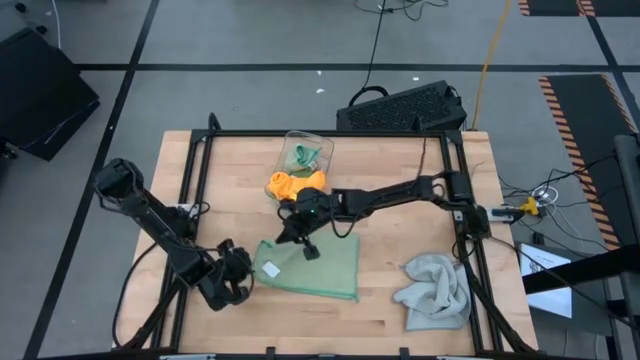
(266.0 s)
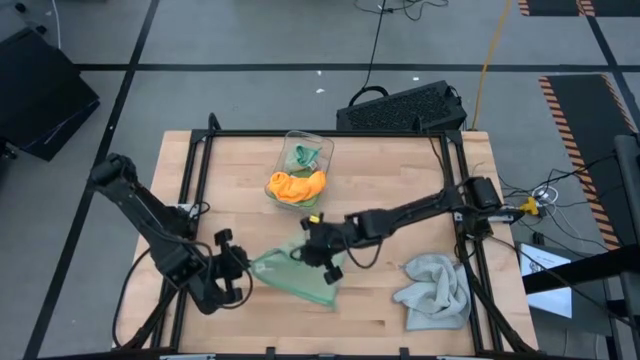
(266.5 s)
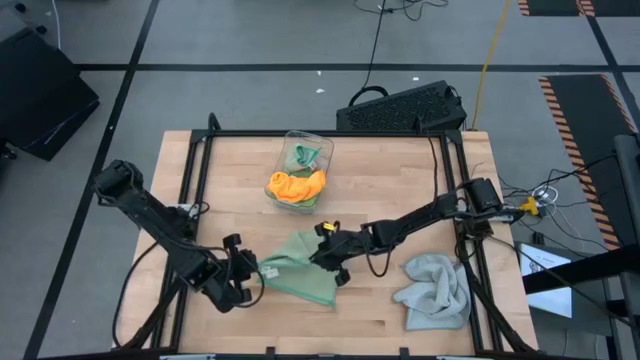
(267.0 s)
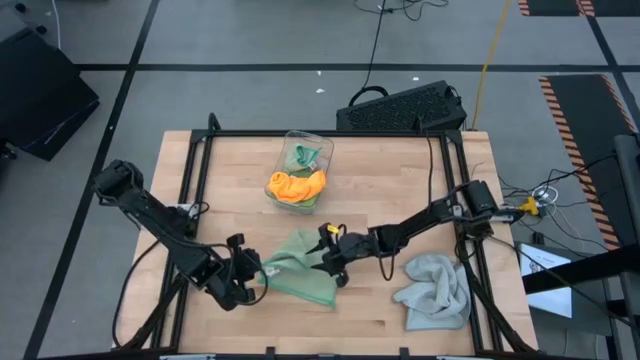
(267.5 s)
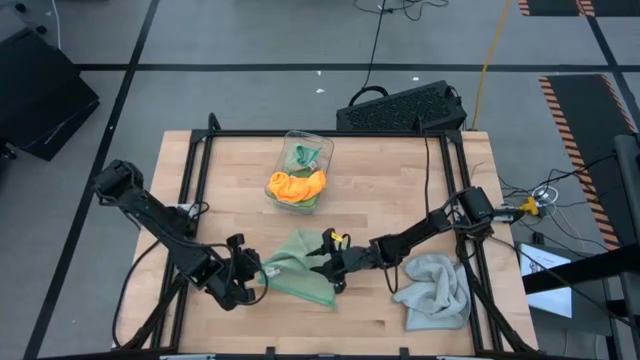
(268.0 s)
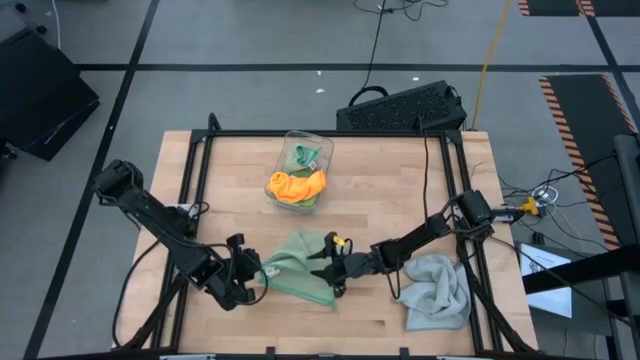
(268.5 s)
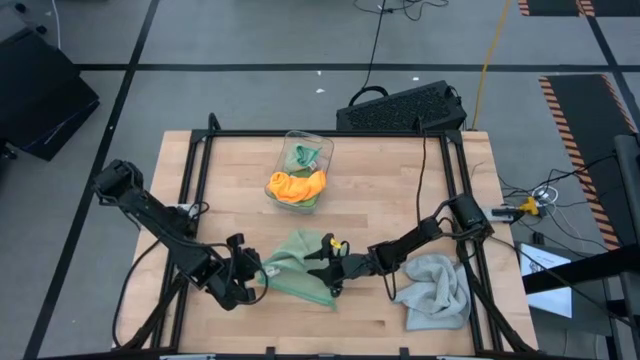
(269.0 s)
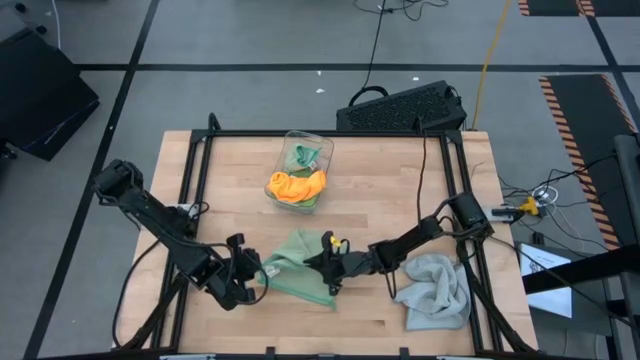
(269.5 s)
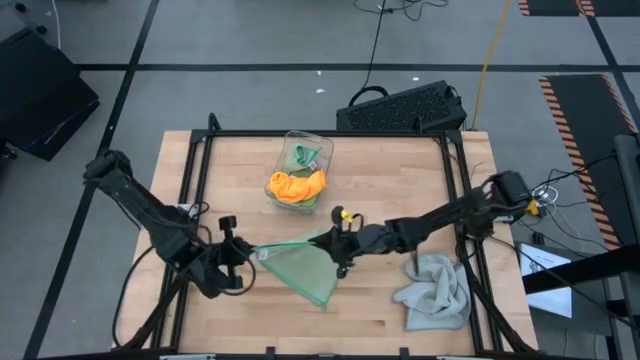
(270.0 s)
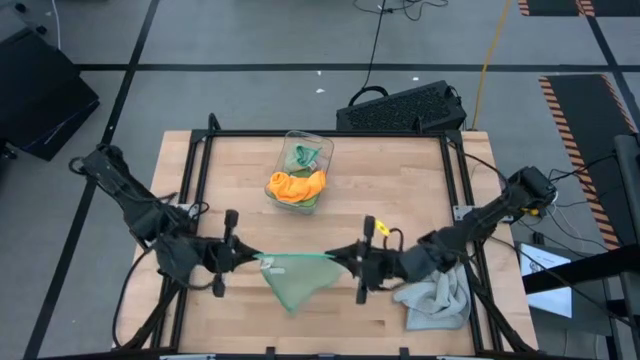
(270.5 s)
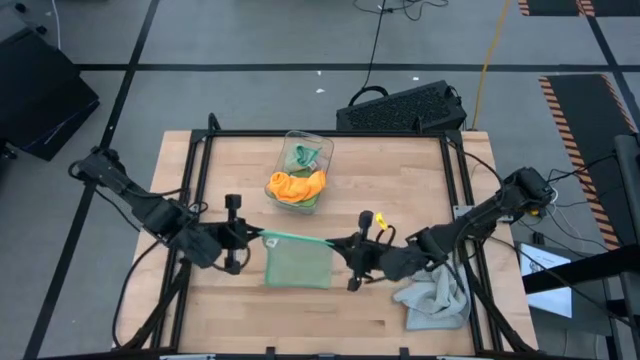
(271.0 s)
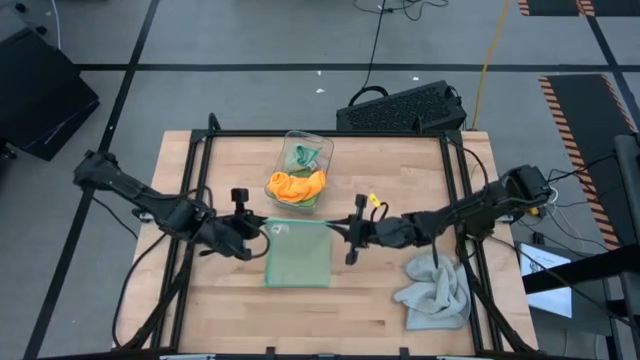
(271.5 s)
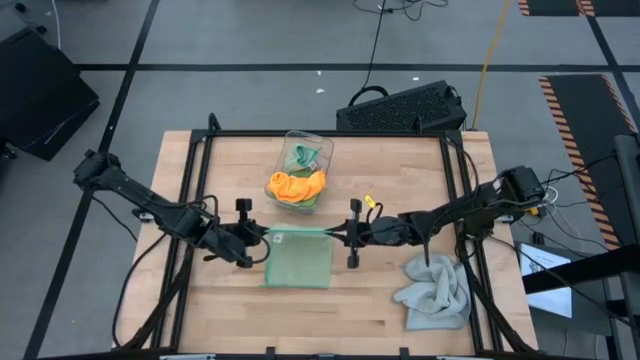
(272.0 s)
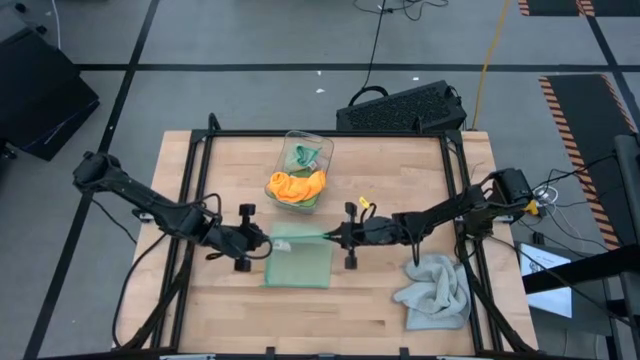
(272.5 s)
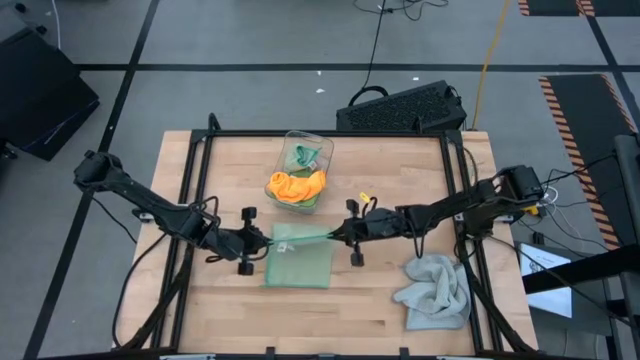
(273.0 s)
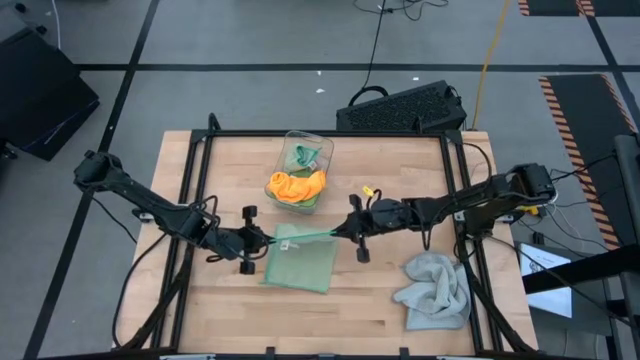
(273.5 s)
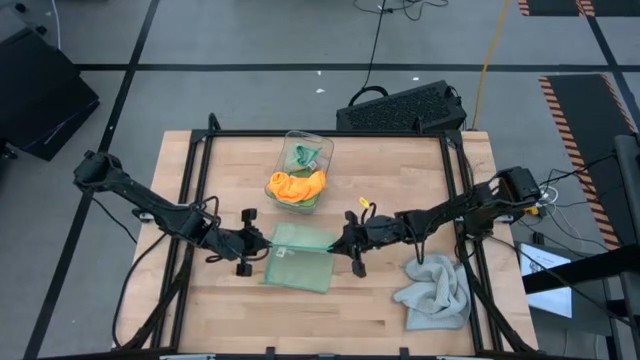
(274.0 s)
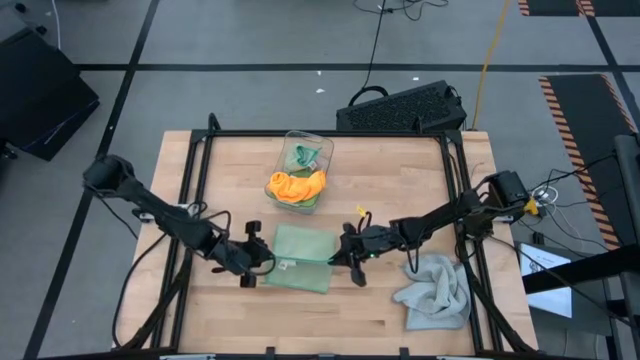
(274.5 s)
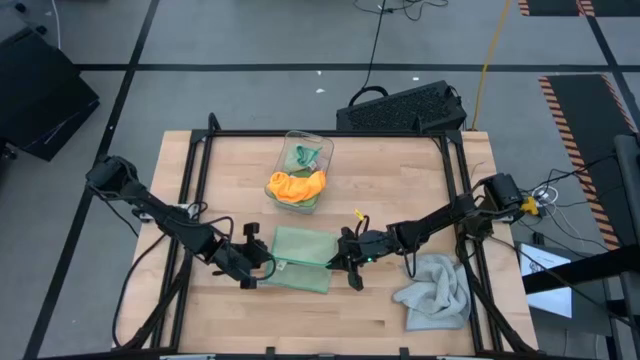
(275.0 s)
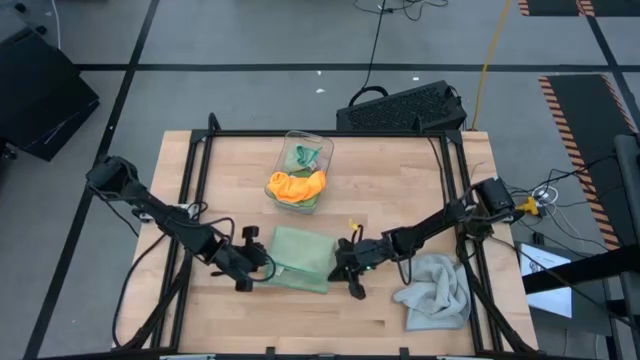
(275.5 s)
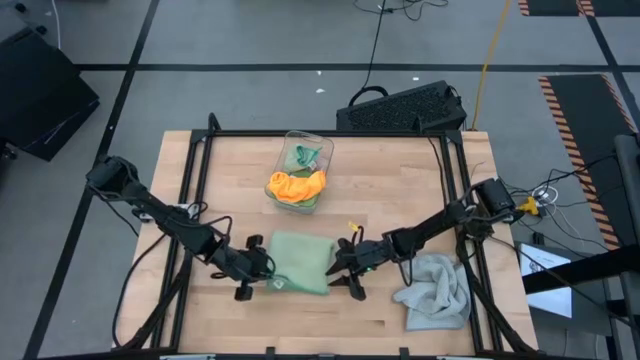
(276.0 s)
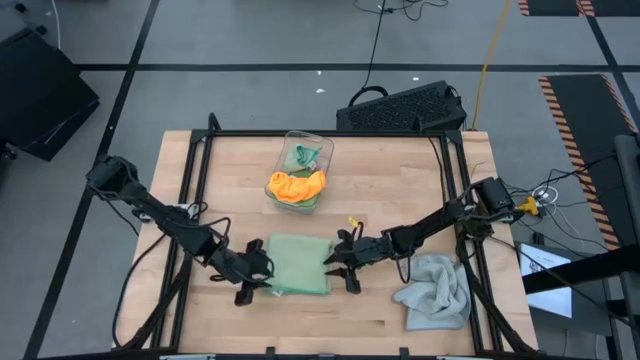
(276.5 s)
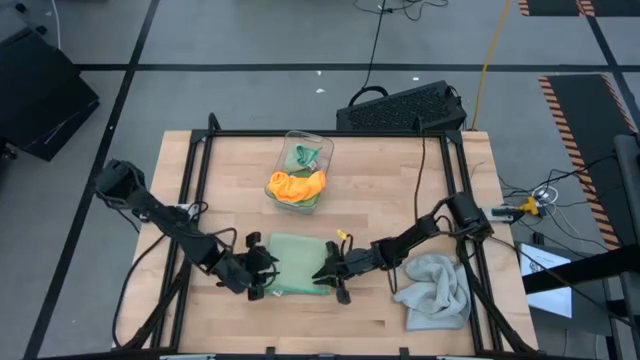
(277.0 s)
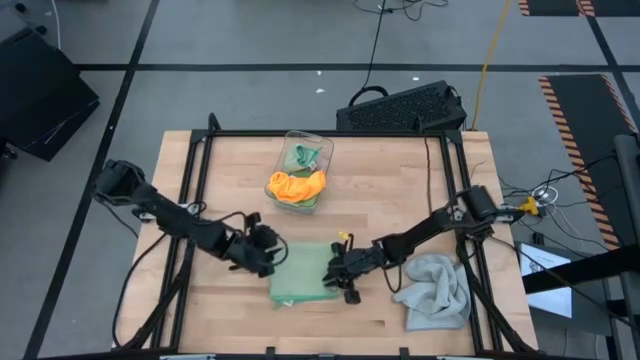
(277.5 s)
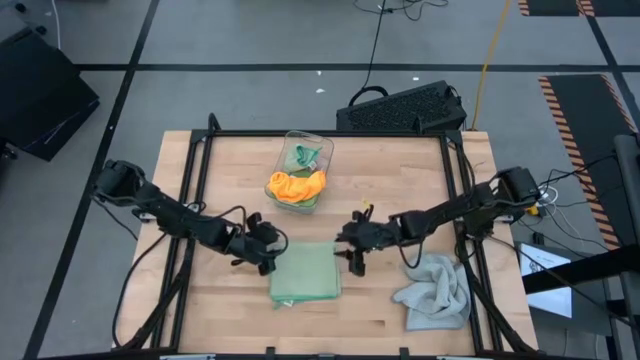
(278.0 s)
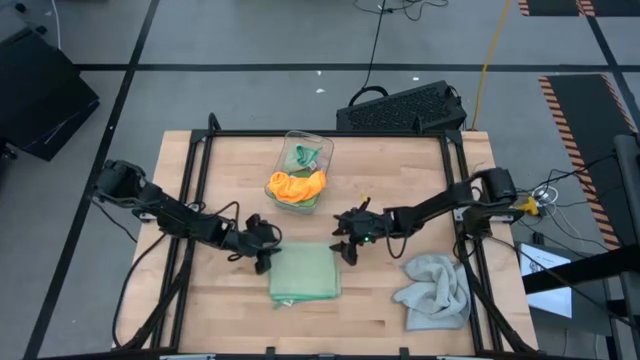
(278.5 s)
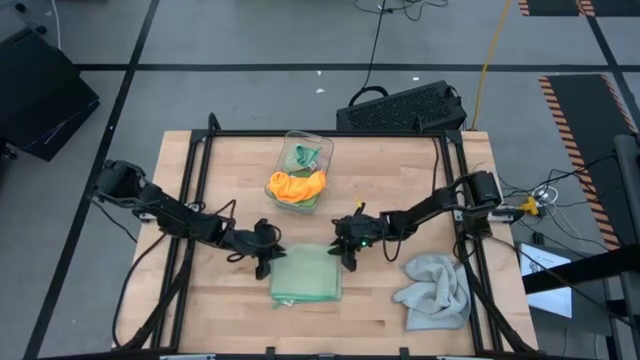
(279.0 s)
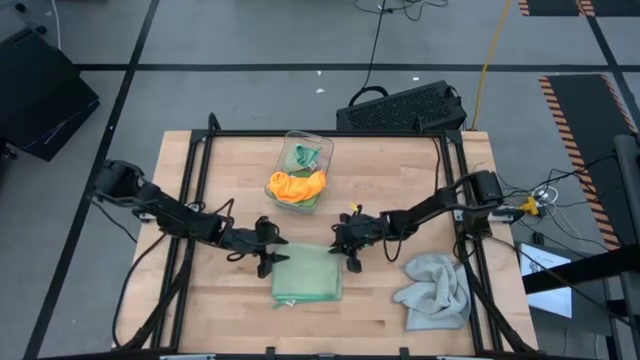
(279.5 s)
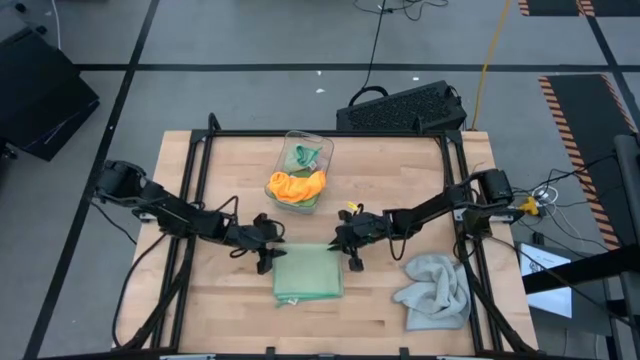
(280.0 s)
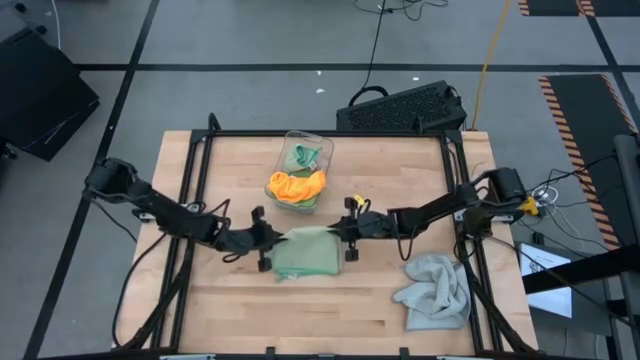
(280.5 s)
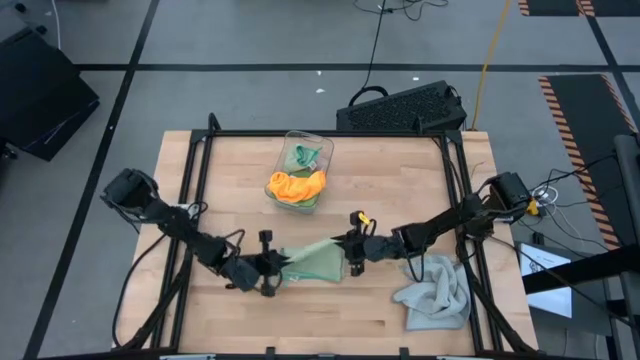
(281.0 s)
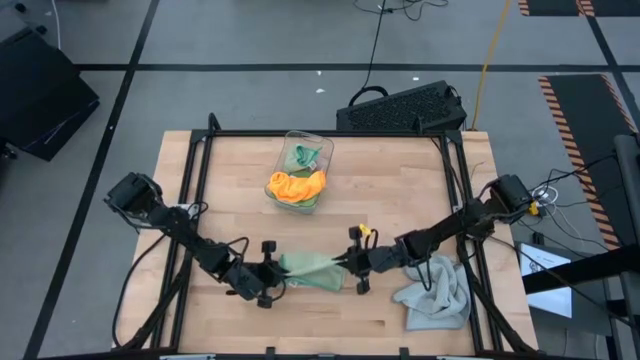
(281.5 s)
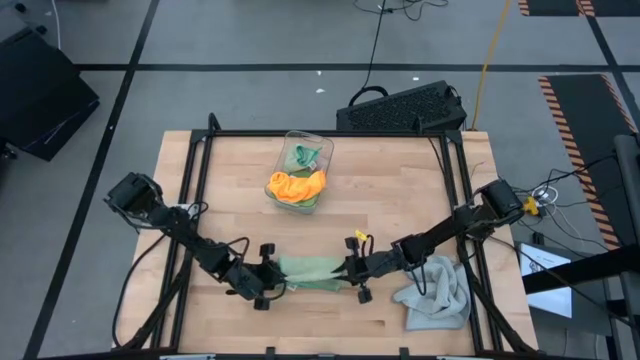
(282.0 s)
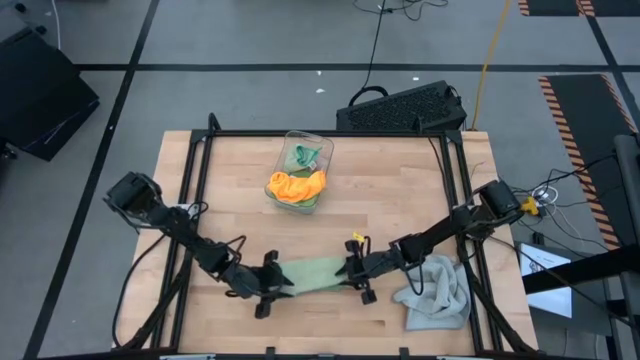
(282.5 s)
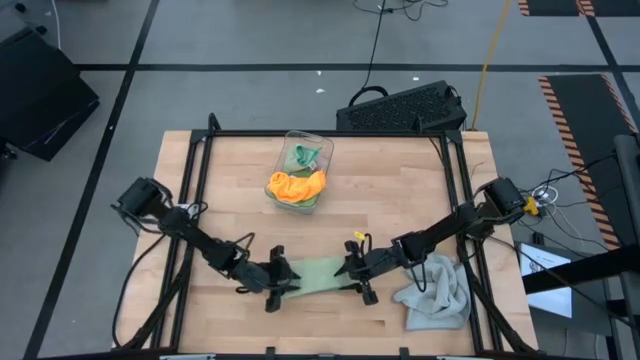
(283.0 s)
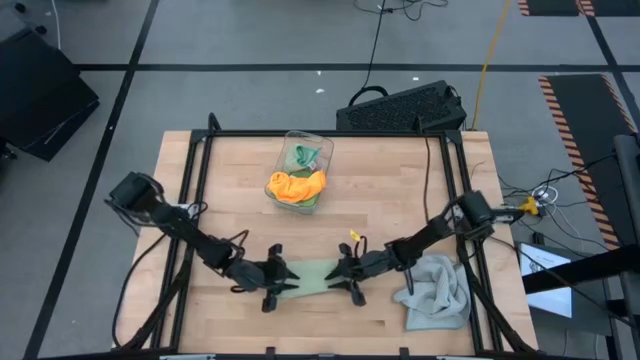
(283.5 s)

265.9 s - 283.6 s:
Task: Fold microfiber towels
Fold the light green towel
